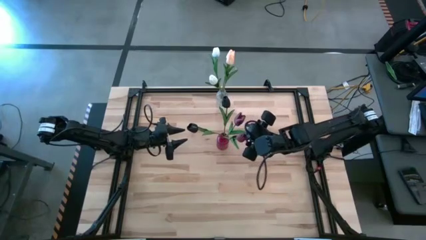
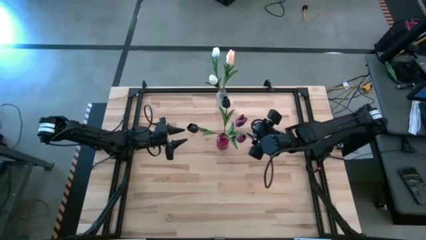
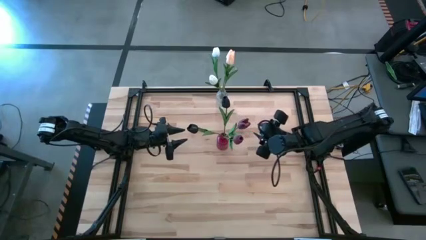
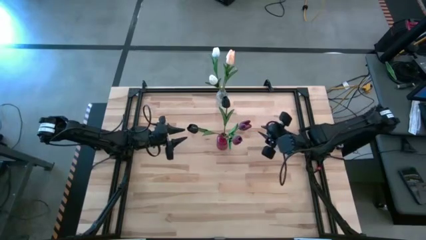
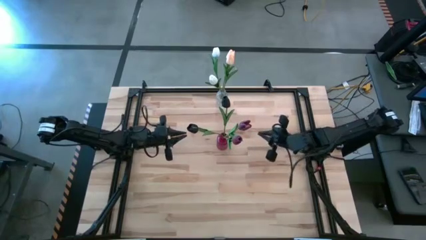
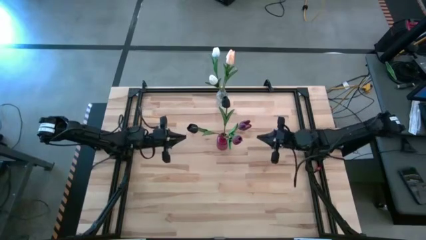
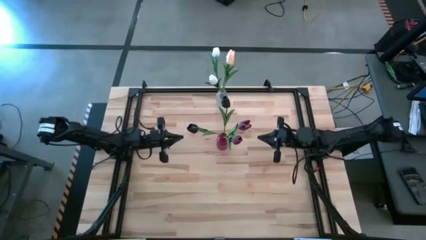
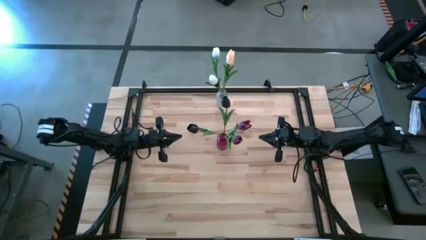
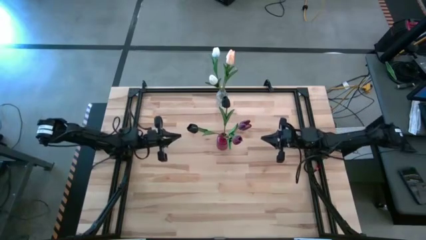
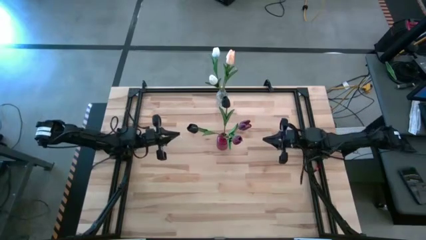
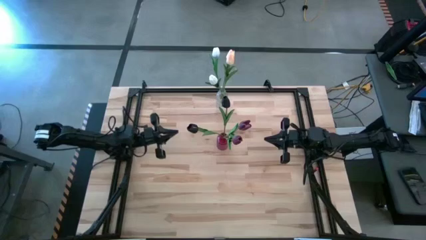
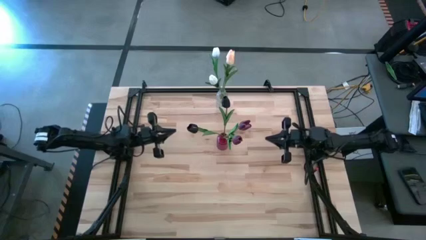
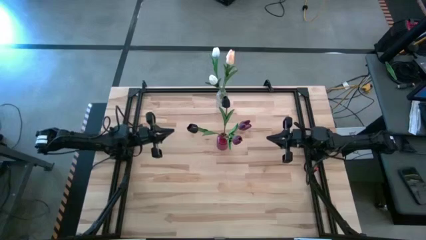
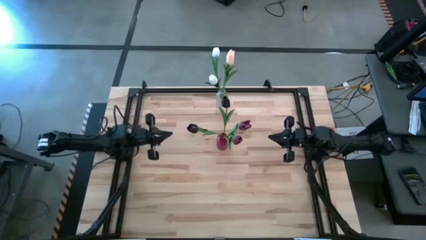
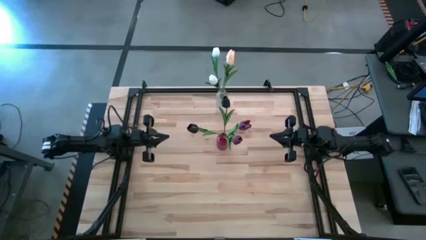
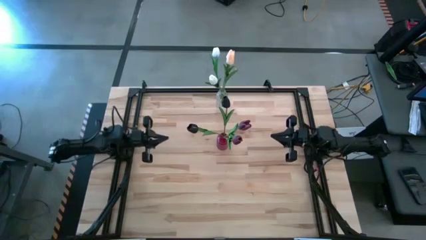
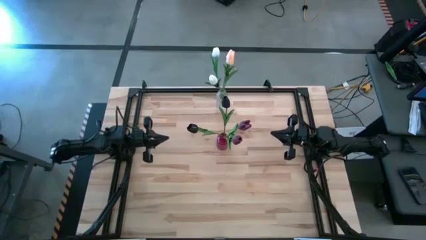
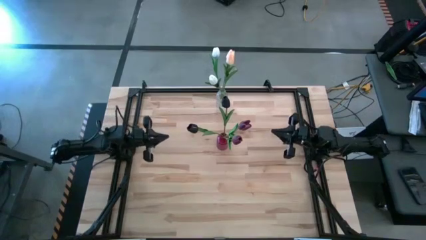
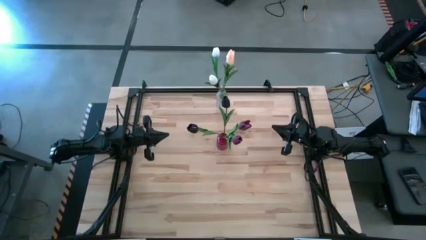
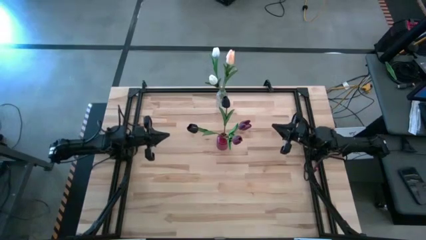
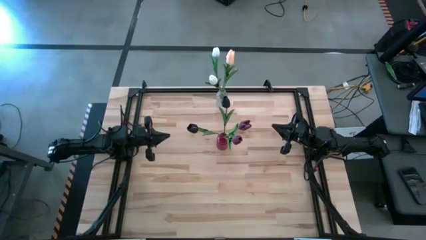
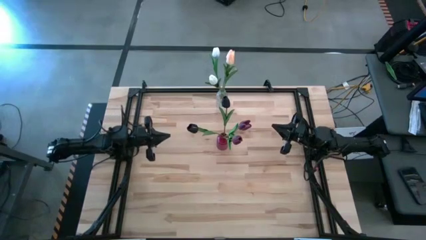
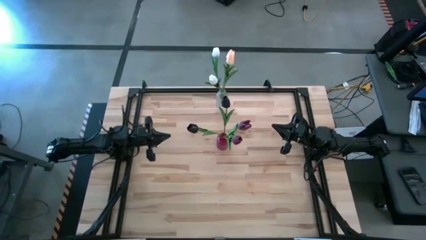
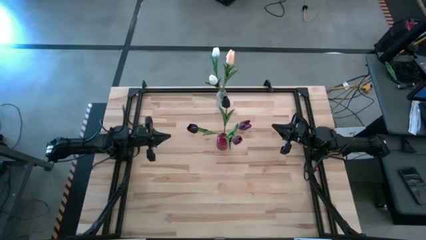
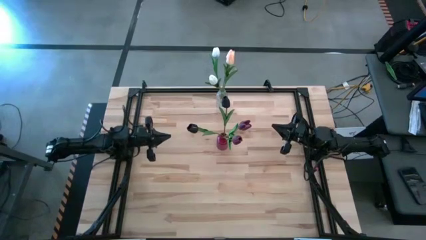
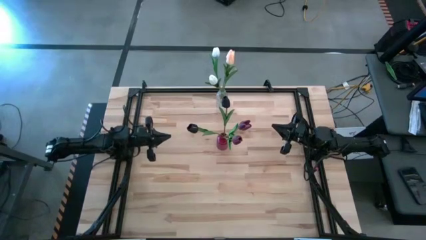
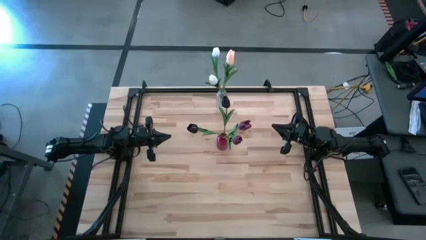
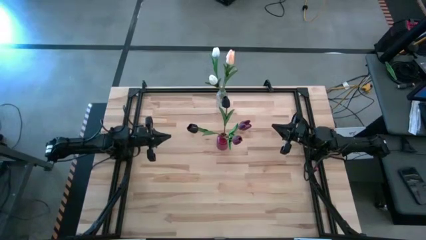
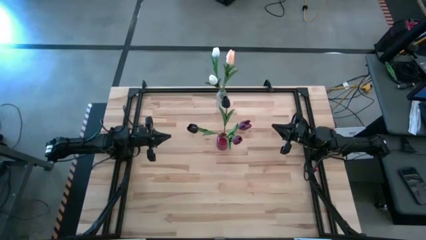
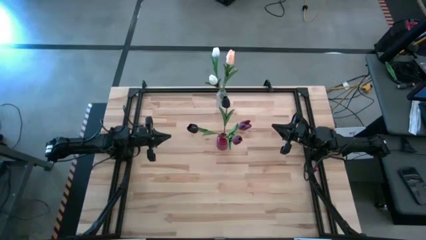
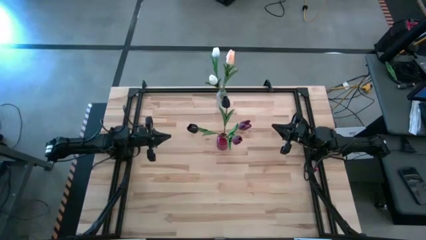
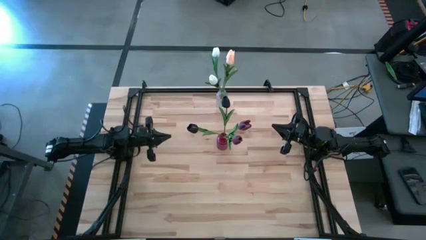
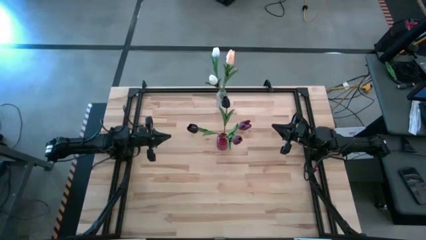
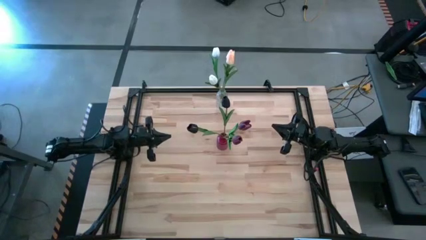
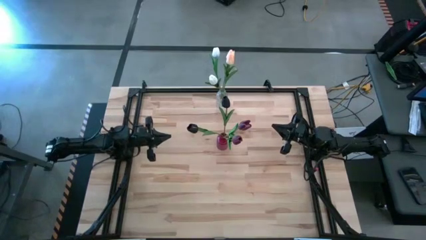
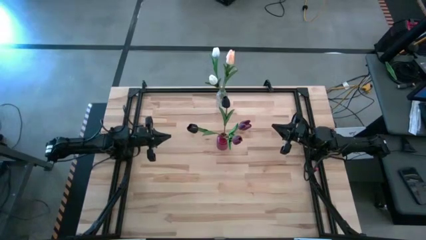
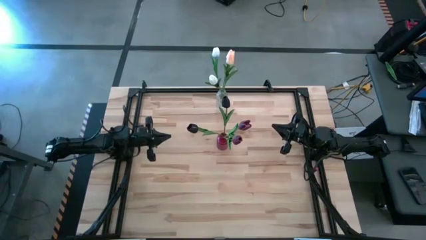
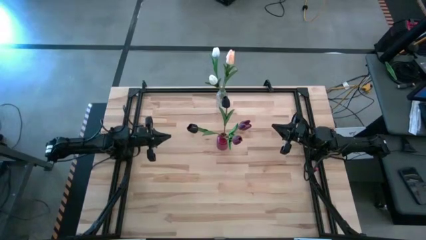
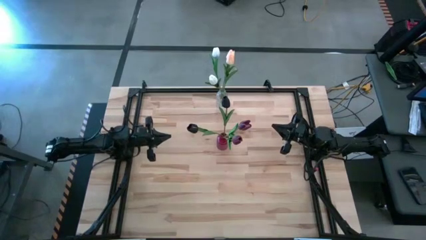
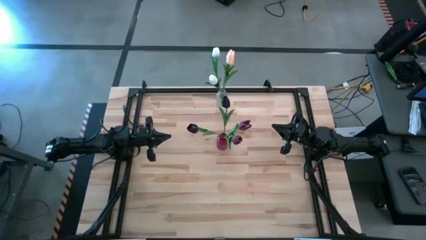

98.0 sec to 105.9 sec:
Task: Sort flowers into vase by color
Return to Home Position

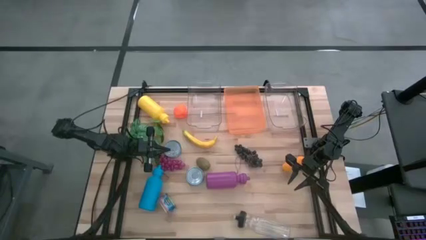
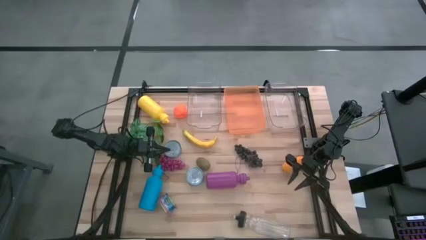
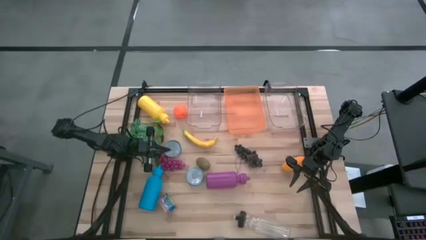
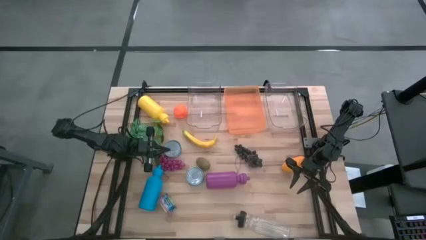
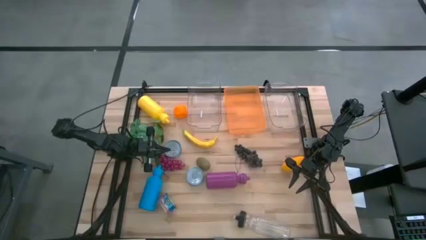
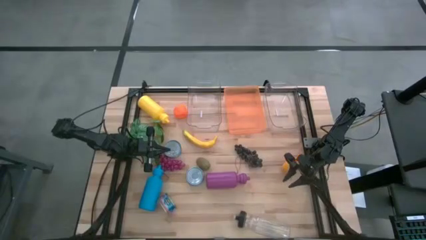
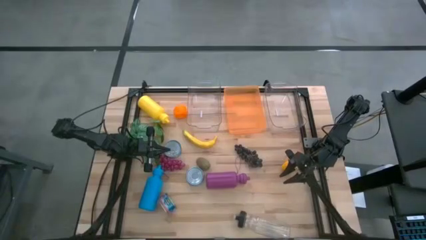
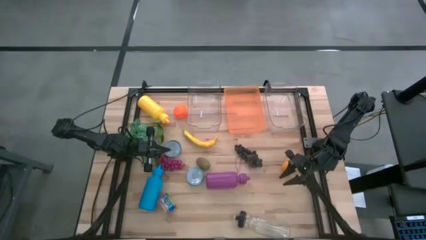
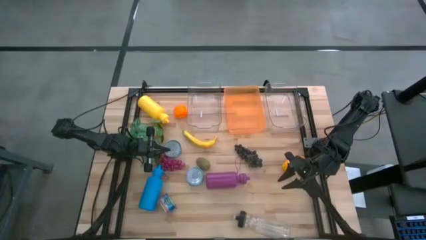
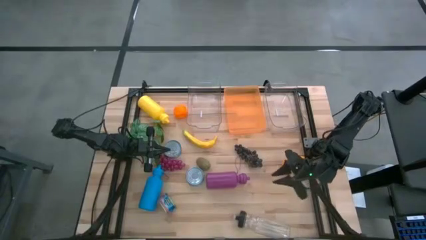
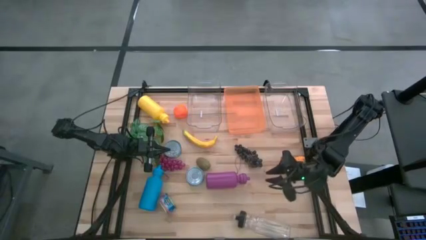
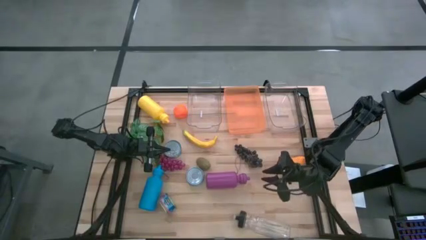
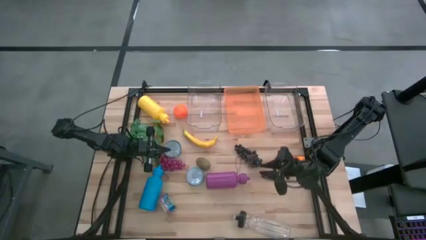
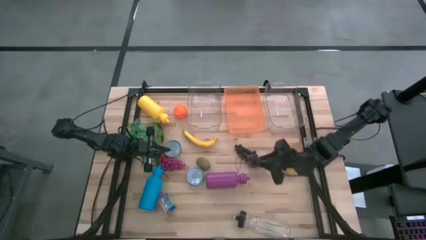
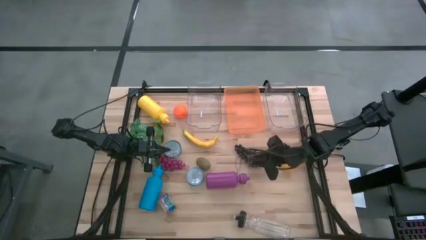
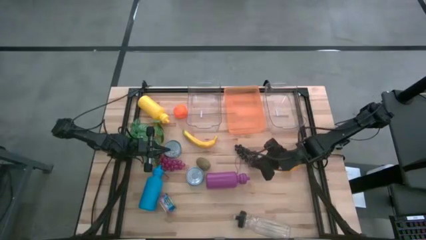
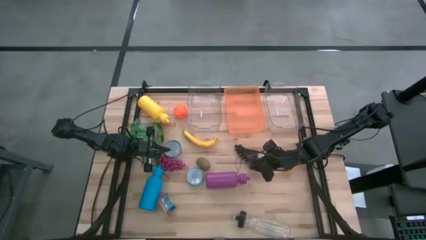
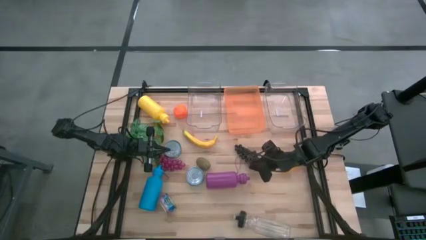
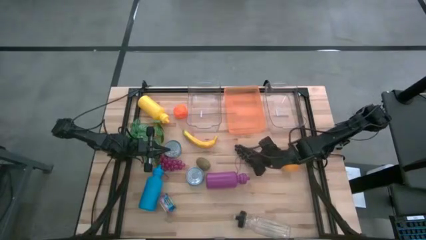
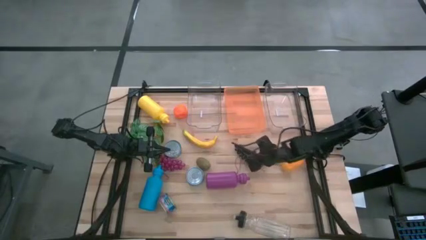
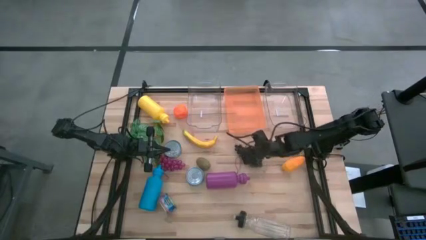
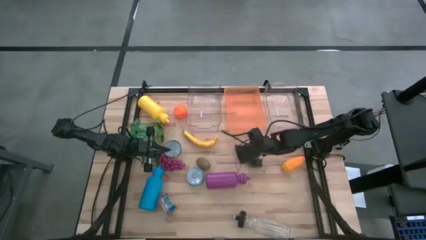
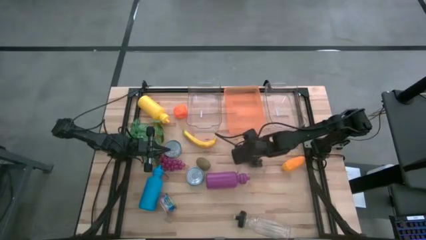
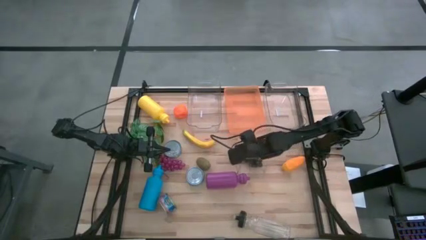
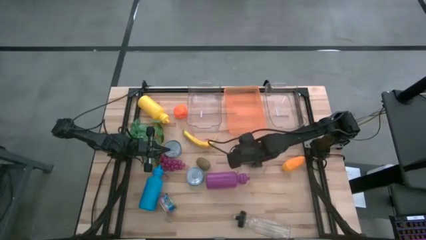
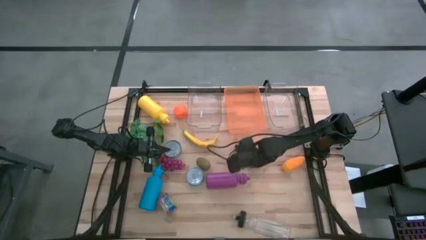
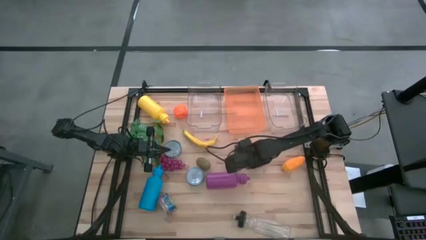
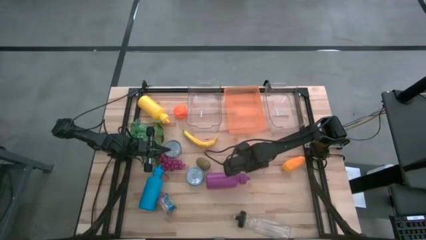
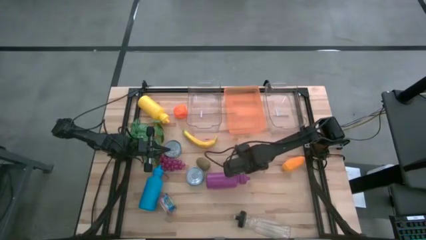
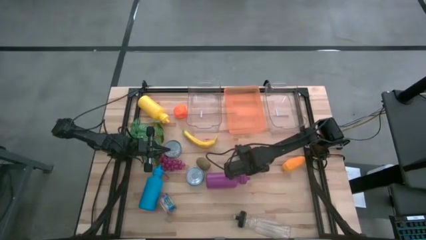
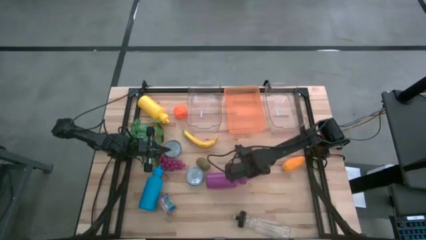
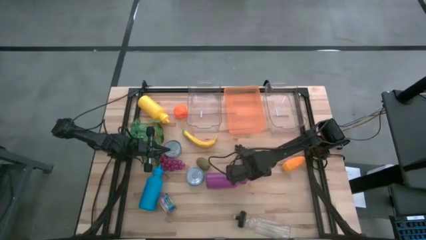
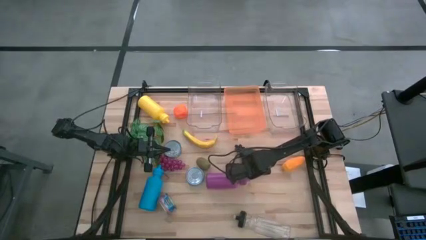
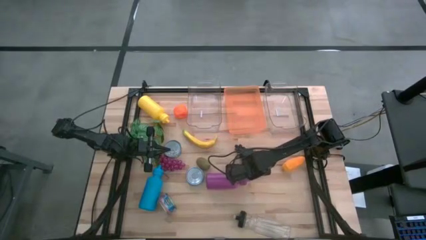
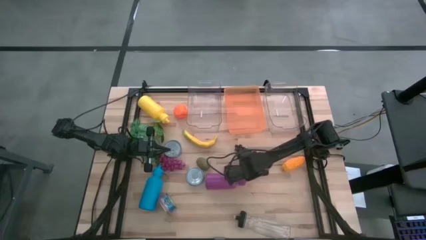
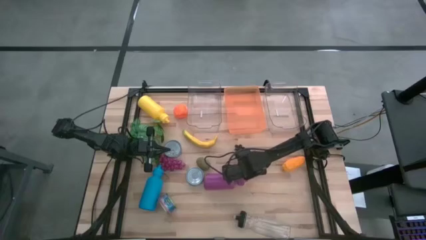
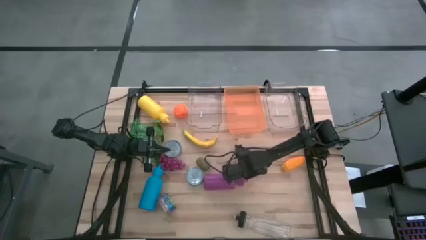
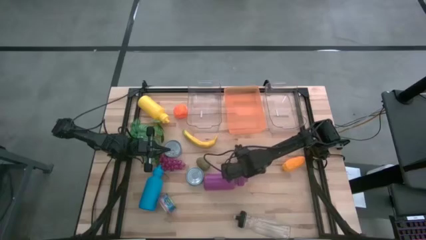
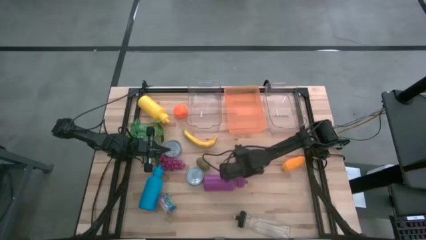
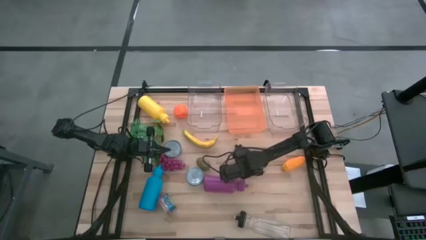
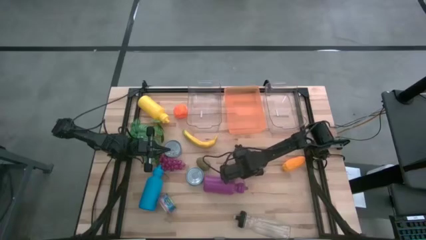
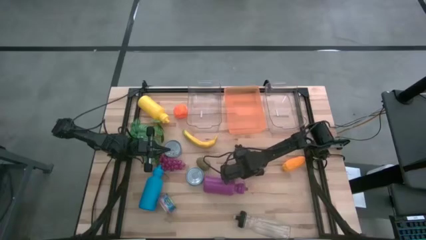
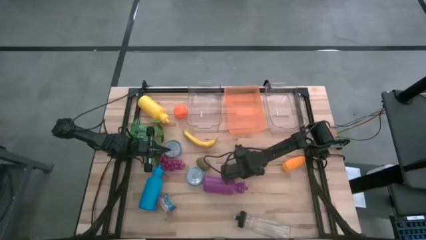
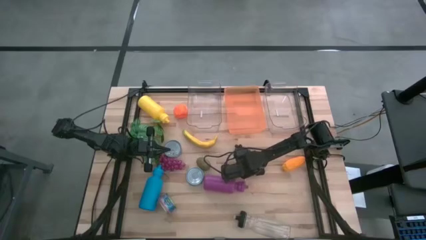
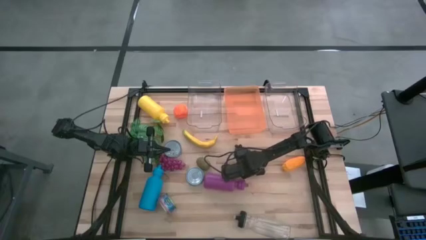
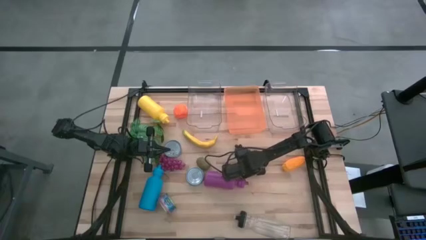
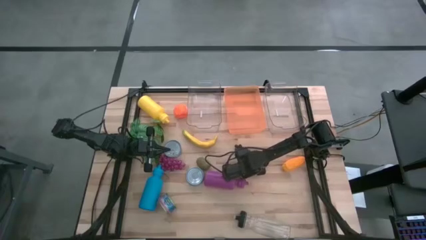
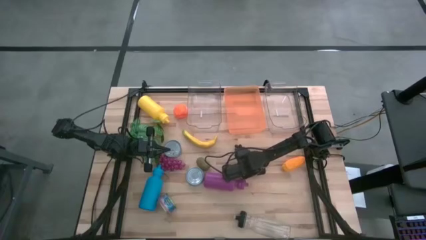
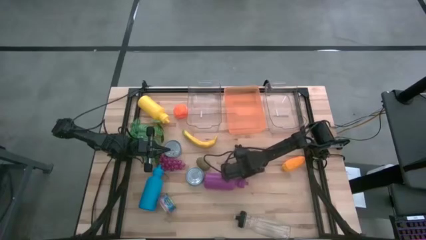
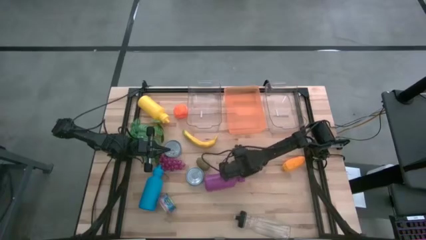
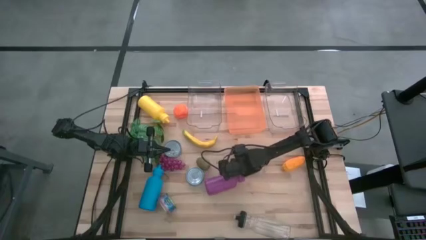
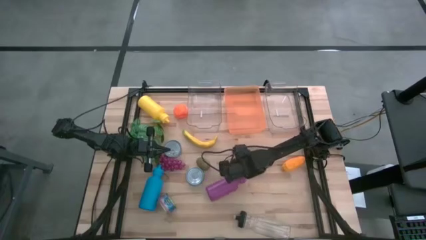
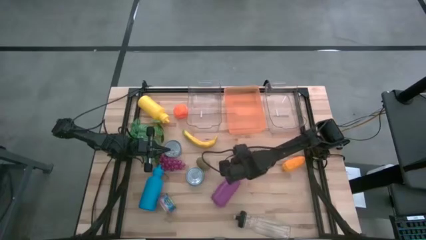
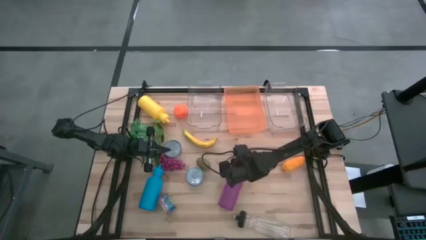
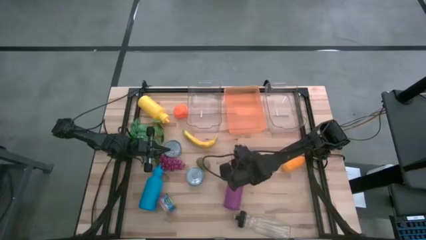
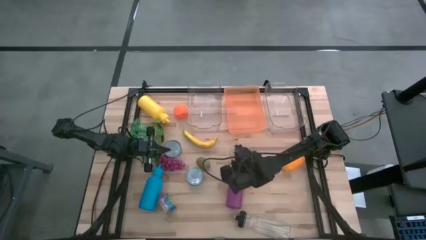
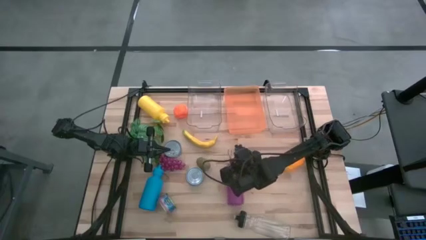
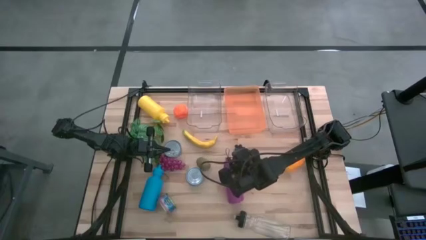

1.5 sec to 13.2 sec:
Task: Pick & Place Food Item
Put the purple water bottle into the right transparent bin
